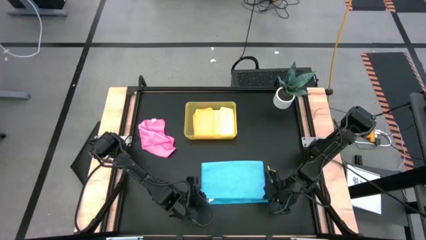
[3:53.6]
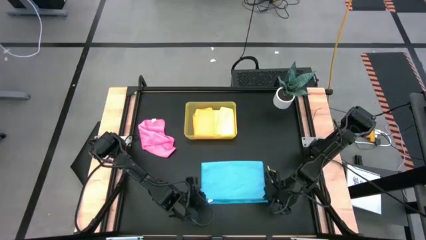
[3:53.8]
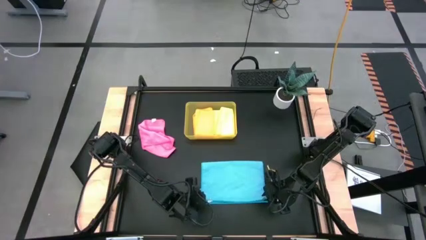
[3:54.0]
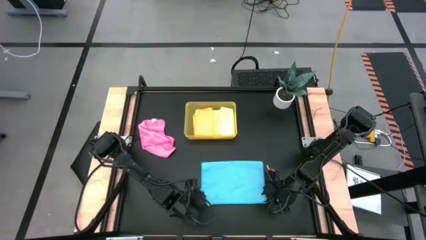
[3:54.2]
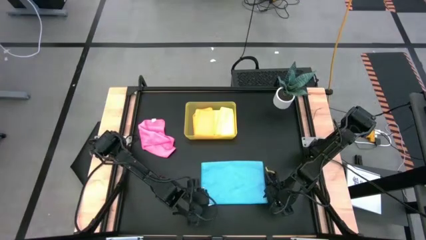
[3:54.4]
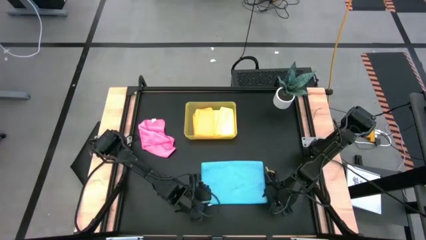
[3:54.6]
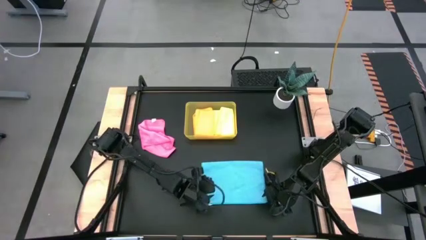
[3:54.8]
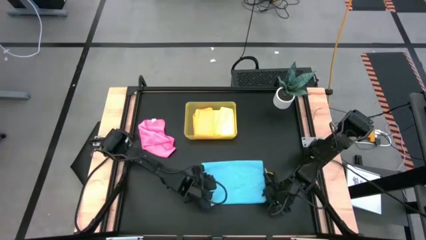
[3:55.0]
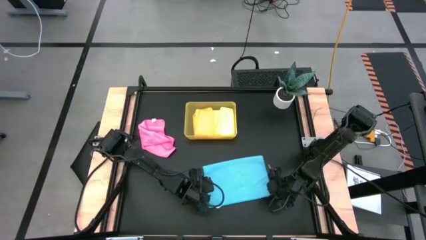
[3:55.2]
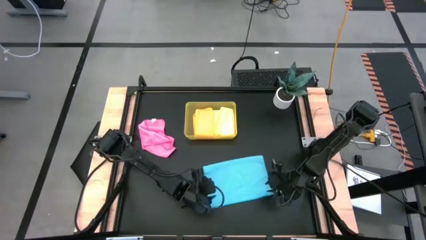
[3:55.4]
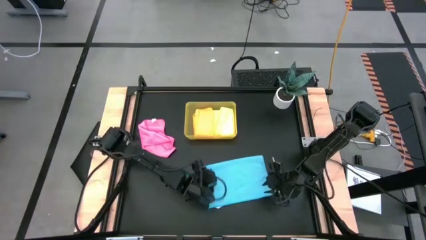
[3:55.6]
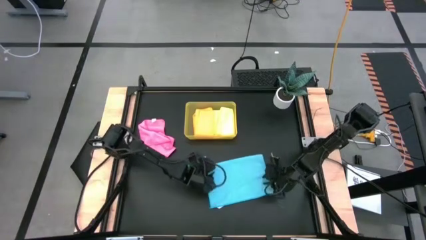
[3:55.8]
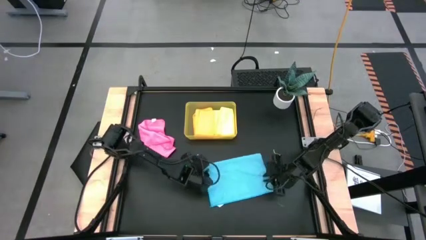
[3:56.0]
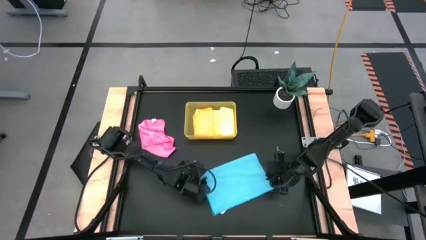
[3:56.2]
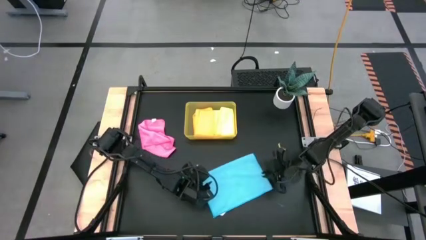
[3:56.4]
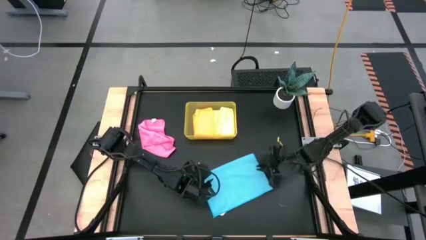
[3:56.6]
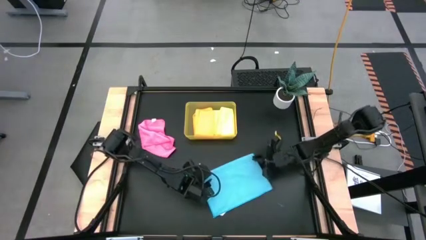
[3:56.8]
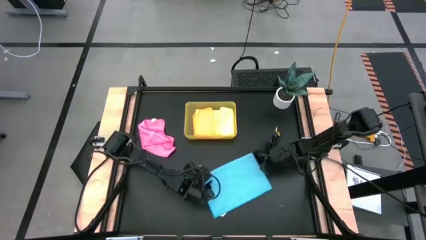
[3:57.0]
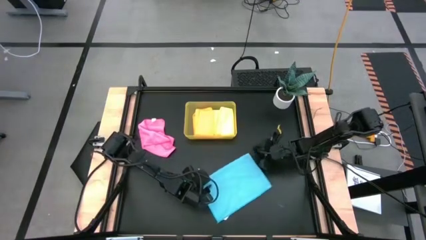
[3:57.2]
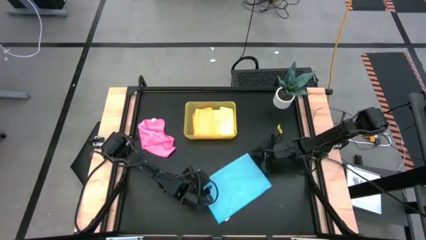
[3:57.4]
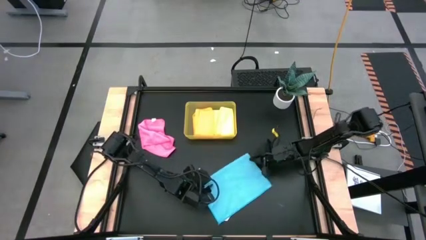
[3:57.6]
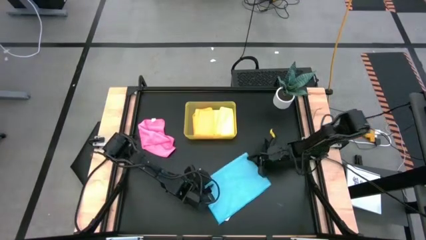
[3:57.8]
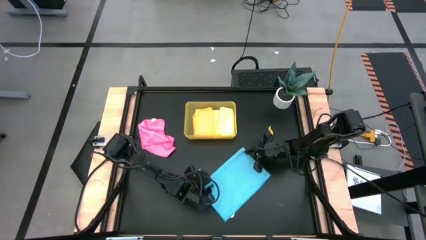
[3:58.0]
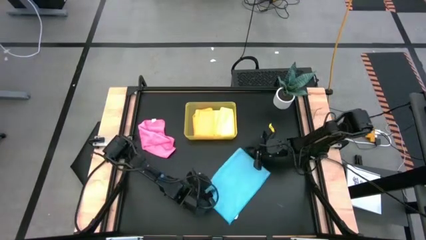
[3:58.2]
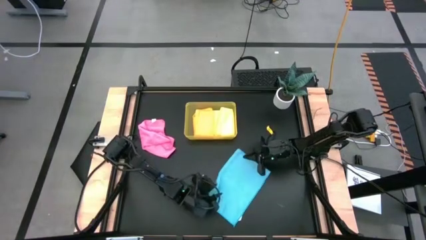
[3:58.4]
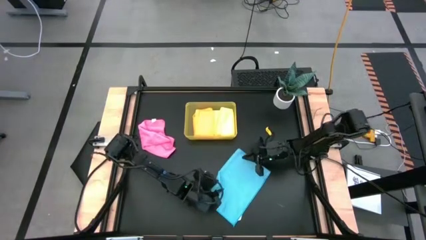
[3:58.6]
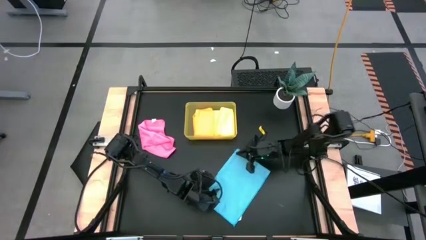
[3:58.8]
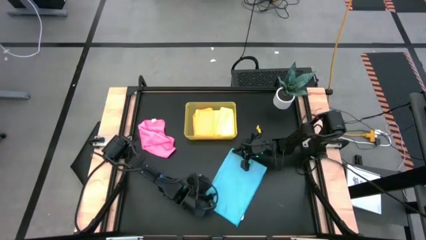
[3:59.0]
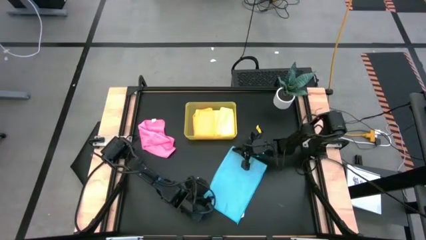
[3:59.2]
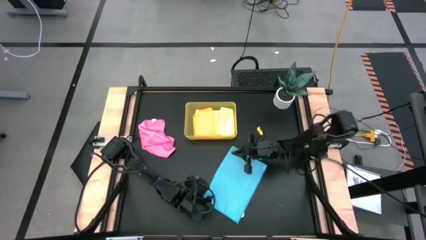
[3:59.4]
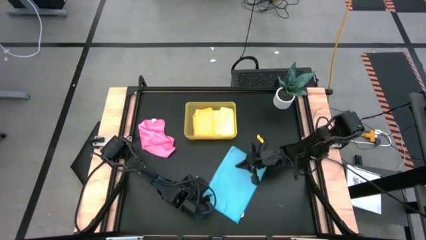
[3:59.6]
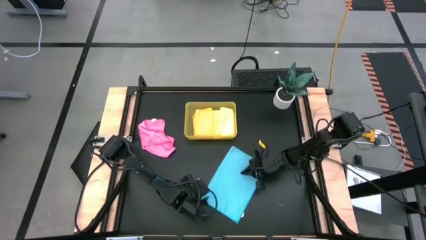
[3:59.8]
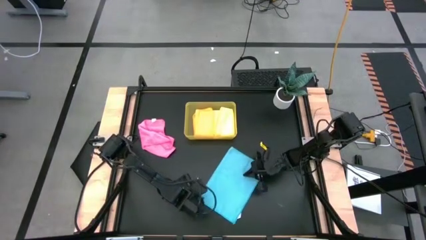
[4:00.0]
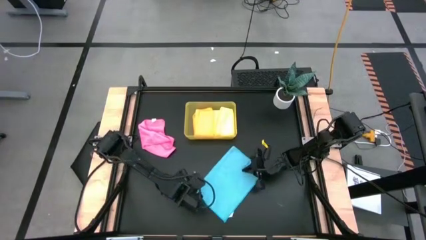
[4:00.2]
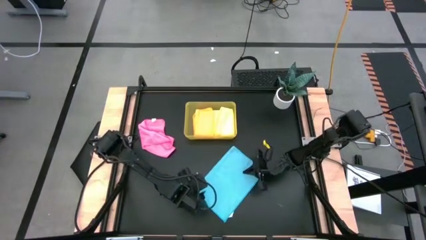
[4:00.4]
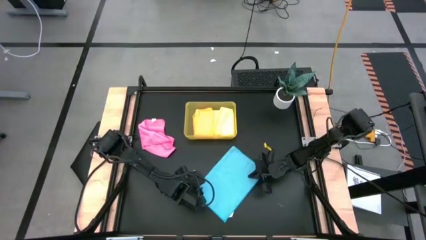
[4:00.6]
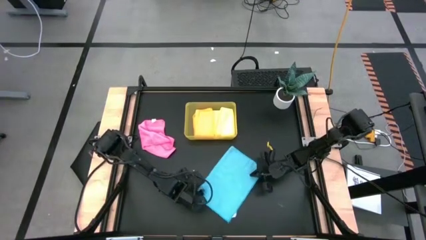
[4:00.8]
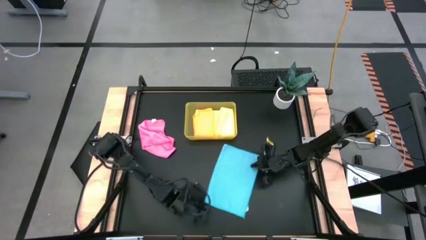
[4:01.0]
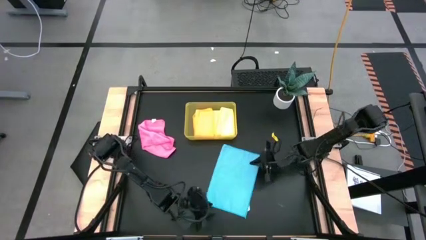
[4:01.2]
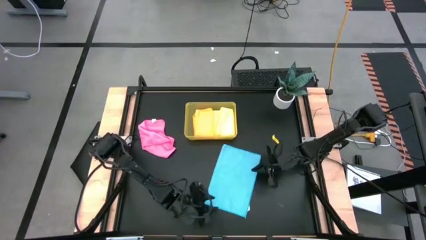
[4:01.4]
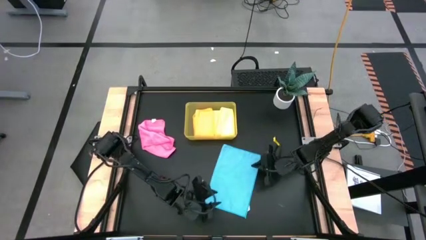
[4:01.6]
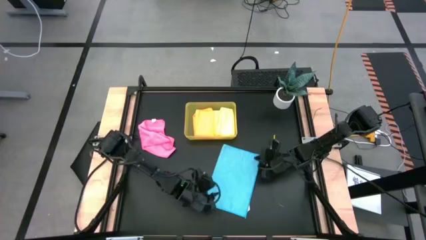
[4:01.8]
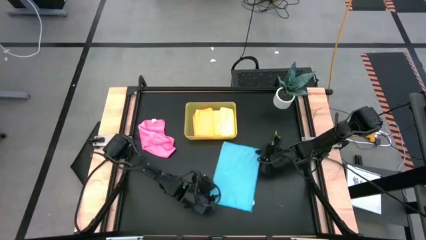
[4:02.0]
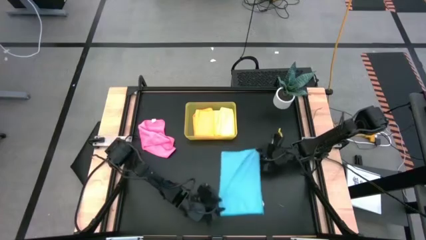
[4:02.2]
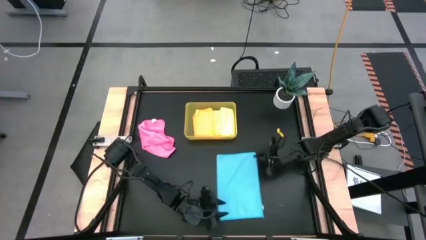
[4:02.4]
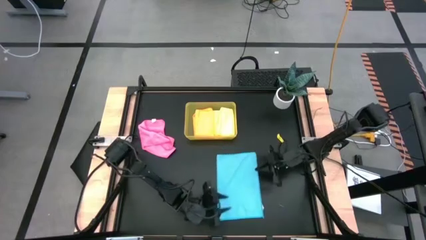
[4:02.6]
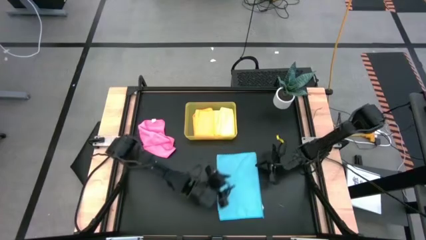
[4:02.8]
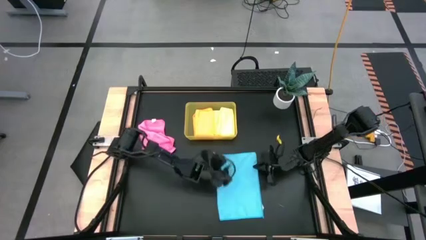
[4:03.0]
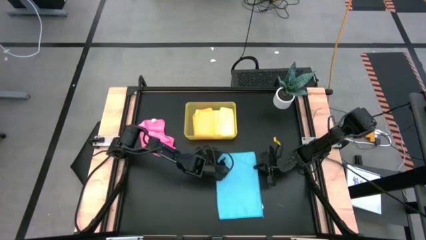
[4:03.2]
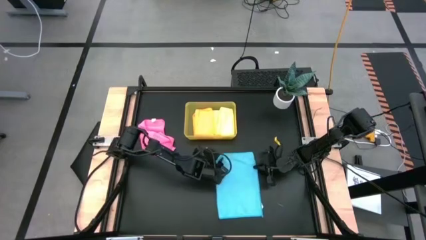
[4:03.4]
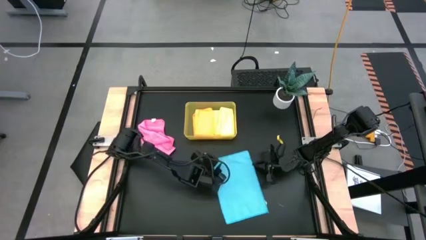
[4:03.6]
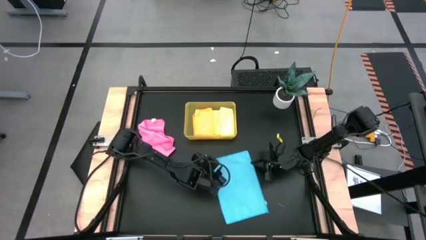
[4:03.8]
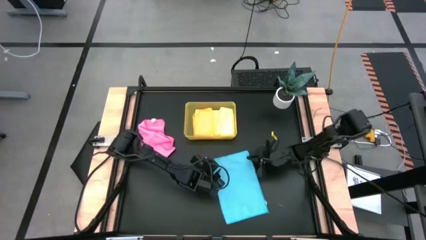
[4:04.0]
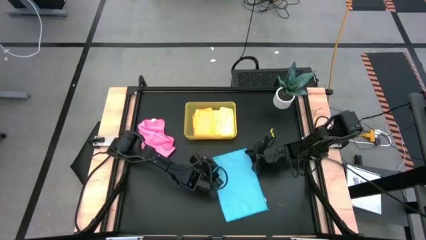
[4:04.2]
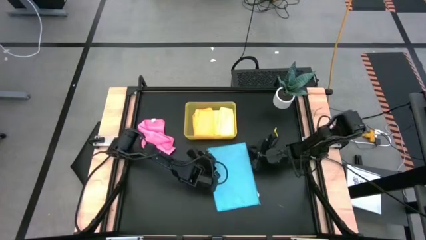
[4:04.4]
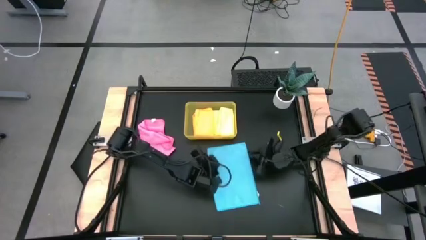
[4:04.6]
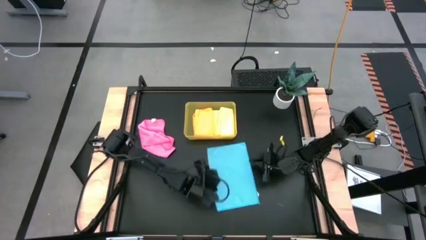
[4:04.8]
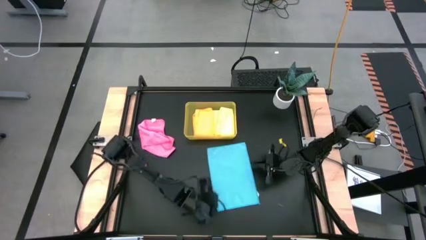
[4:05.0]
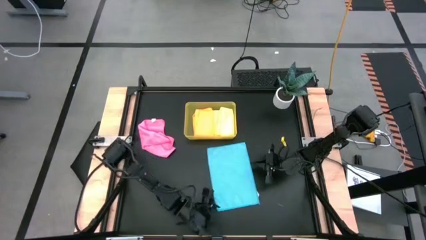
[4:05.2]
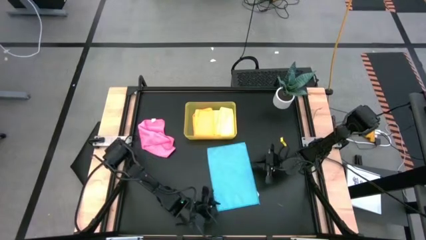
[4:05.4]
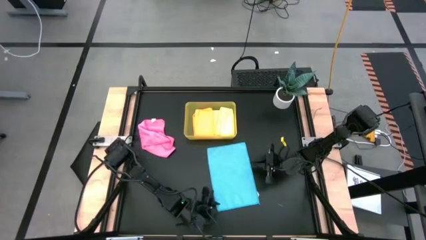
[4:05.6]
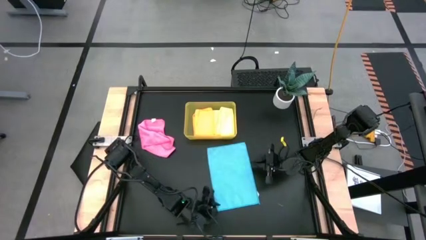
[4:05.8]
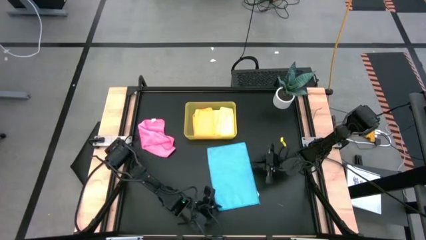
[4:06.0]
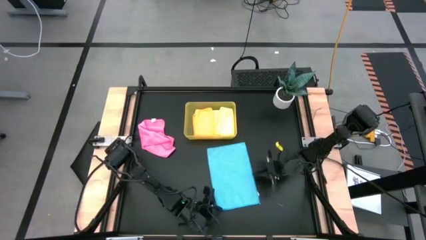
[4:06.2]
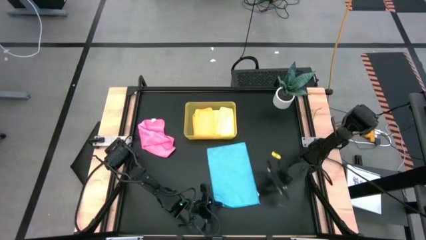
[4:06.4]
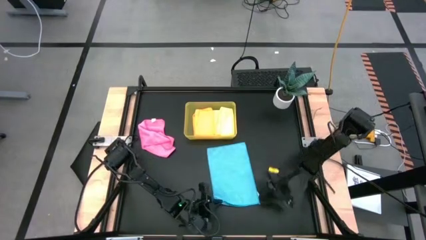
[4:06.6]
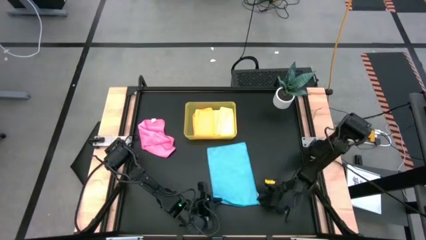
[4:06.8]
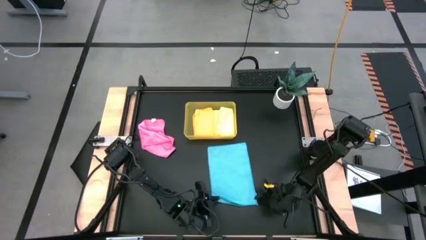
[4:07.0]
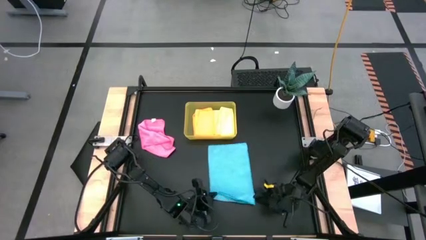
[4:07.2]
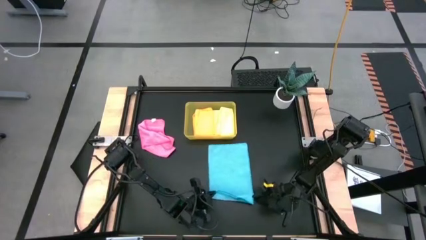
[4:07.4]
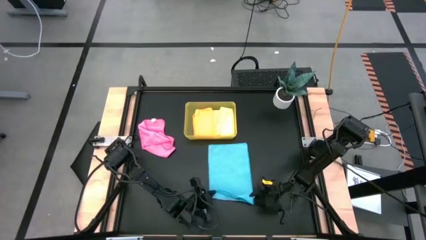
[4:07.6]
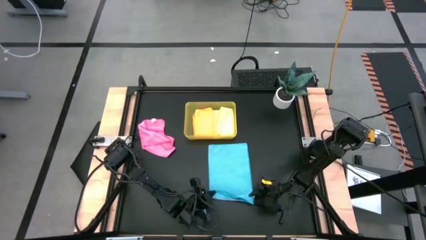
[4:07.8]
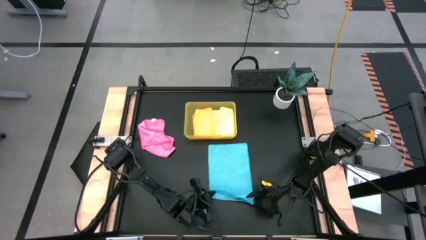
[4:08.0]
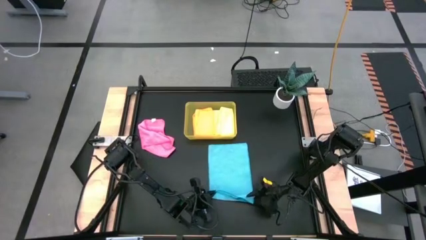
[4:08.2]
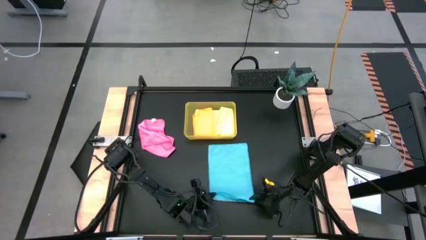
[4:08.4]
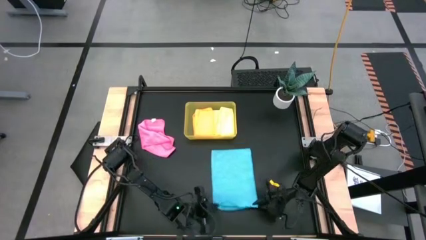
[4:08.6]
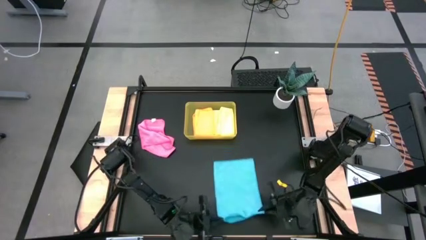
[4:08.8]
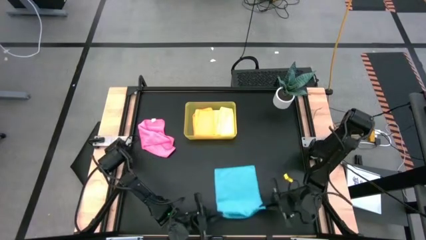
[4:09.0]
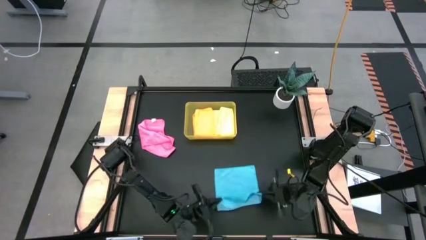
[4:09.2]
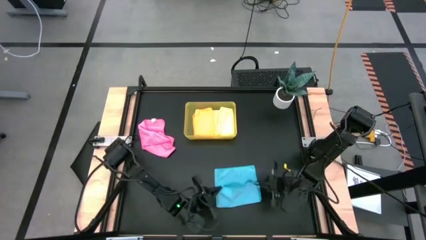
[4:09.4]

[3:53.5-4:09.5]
Task: Fold microfiber towels
Fold the blue microfiber cloth
